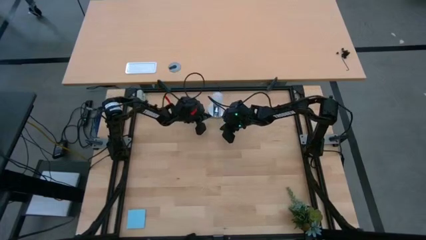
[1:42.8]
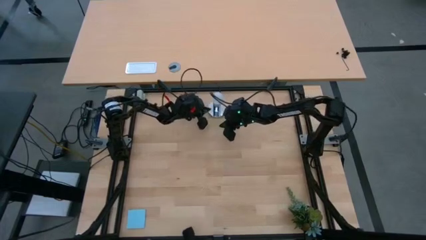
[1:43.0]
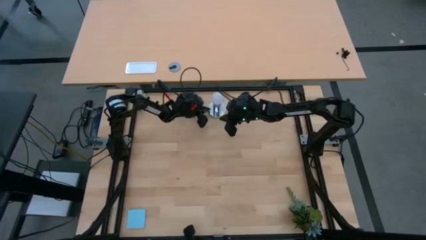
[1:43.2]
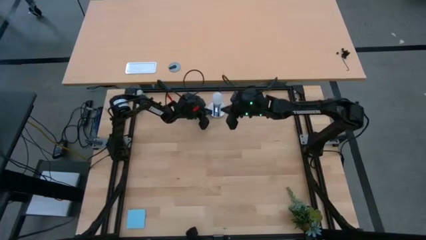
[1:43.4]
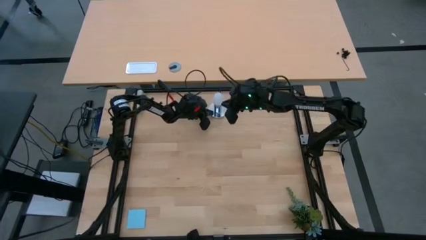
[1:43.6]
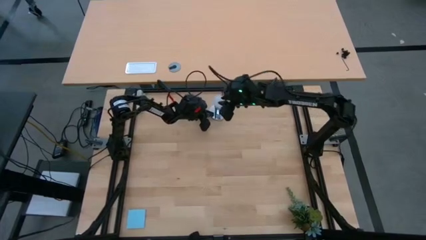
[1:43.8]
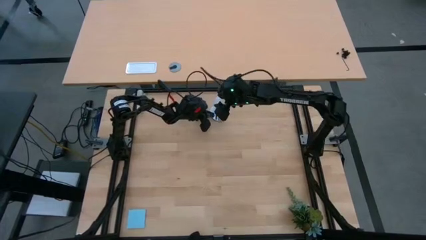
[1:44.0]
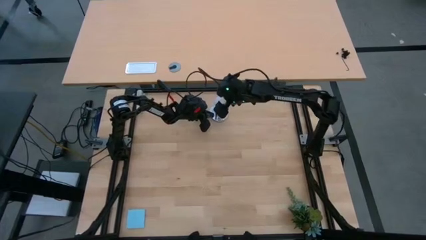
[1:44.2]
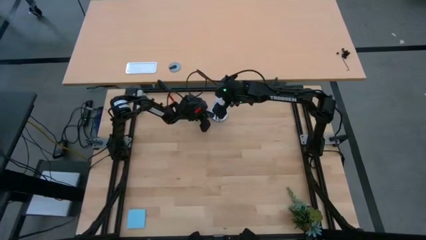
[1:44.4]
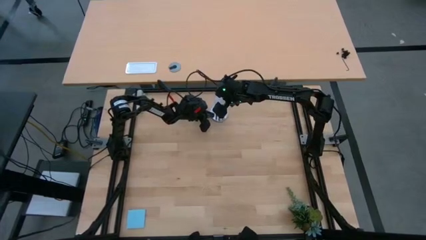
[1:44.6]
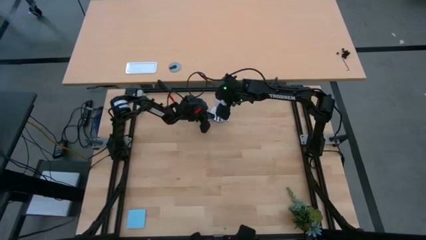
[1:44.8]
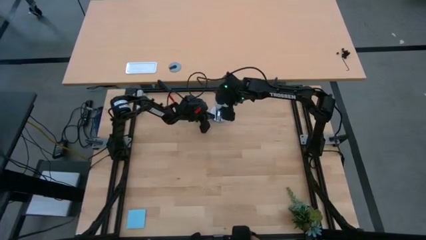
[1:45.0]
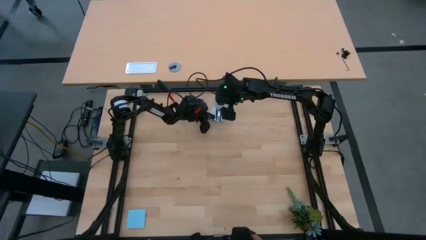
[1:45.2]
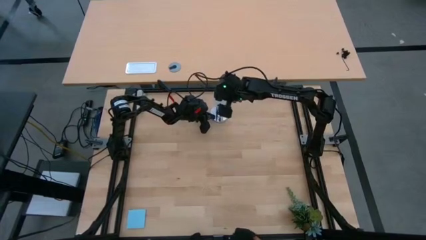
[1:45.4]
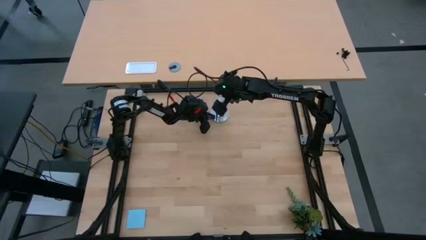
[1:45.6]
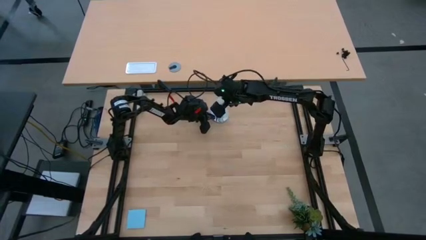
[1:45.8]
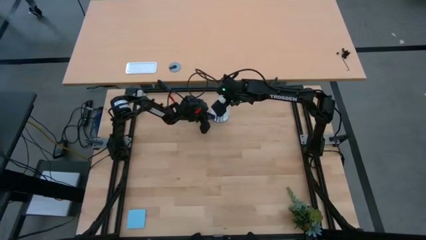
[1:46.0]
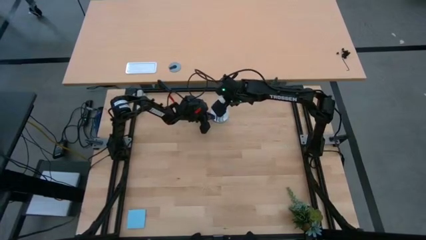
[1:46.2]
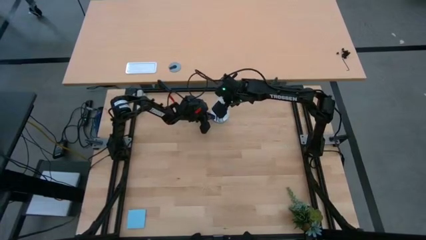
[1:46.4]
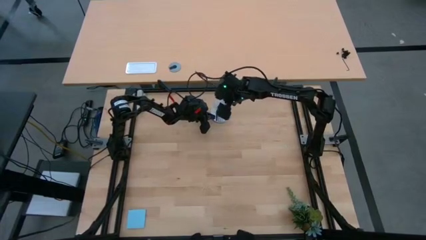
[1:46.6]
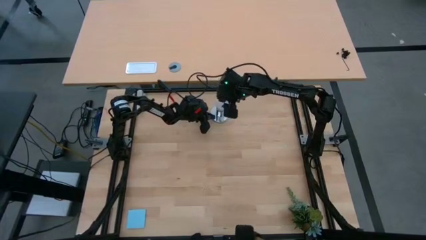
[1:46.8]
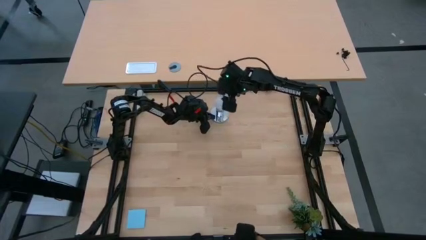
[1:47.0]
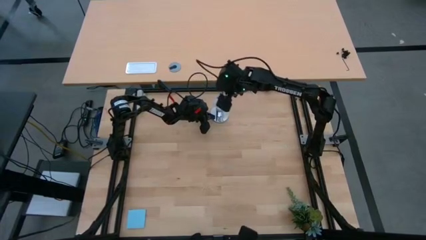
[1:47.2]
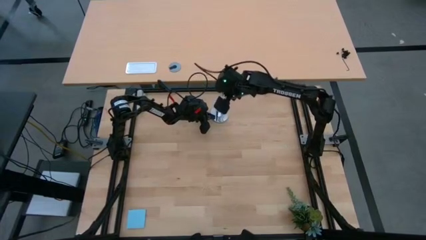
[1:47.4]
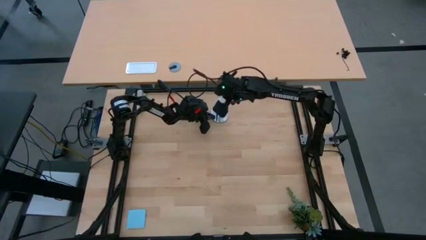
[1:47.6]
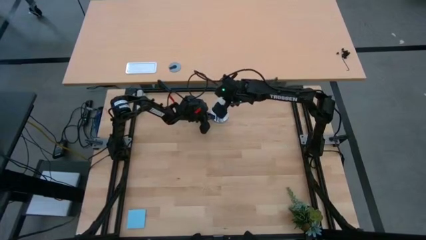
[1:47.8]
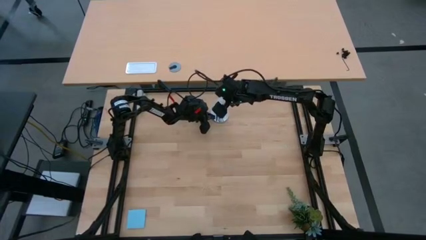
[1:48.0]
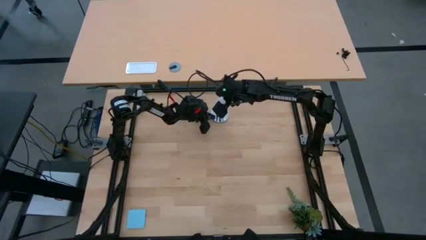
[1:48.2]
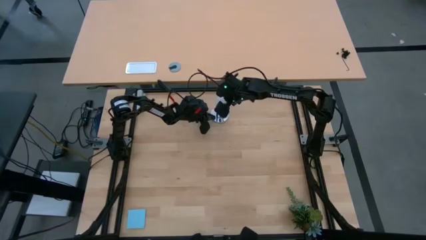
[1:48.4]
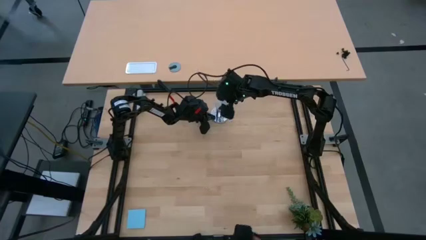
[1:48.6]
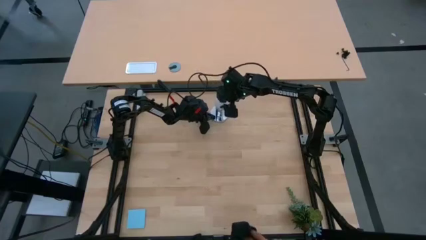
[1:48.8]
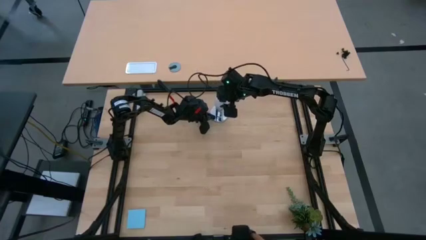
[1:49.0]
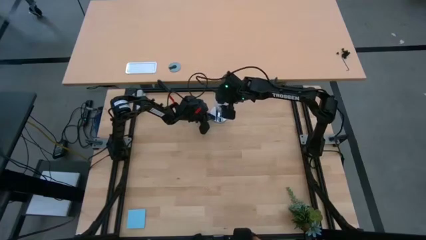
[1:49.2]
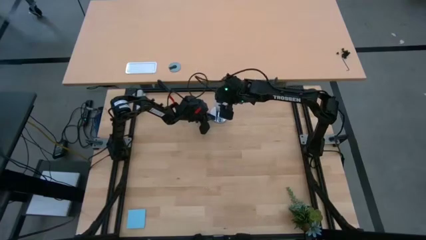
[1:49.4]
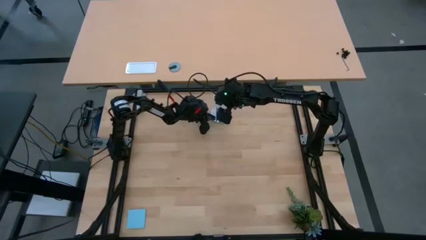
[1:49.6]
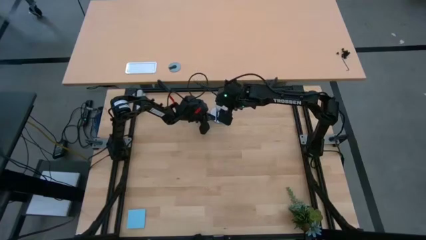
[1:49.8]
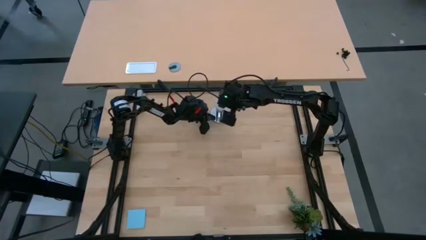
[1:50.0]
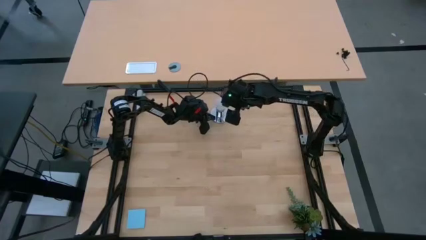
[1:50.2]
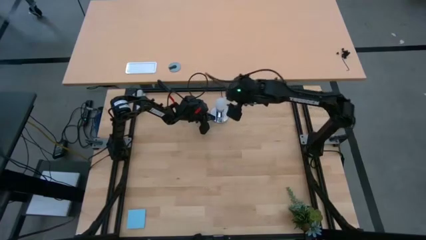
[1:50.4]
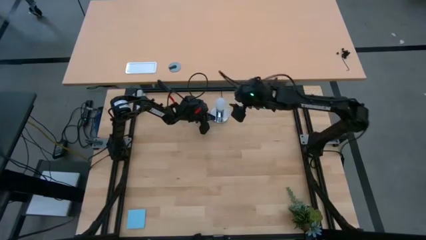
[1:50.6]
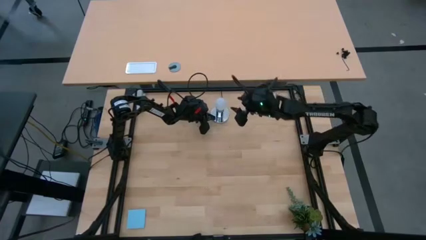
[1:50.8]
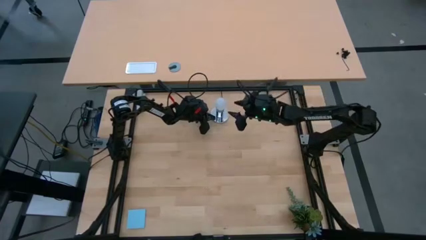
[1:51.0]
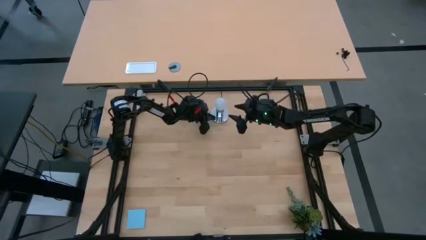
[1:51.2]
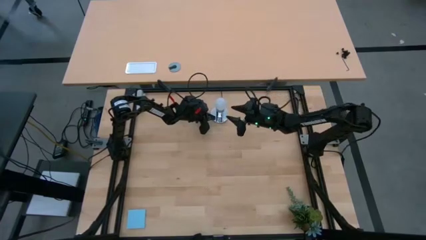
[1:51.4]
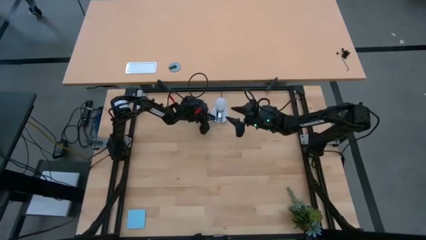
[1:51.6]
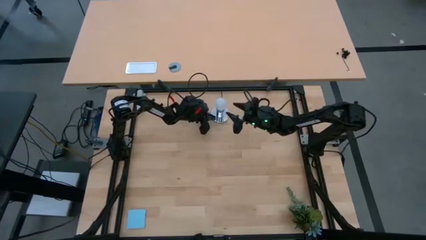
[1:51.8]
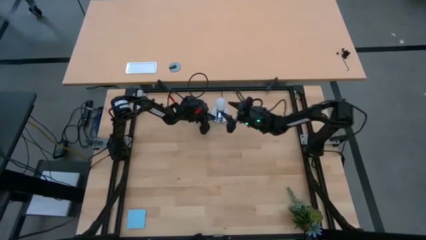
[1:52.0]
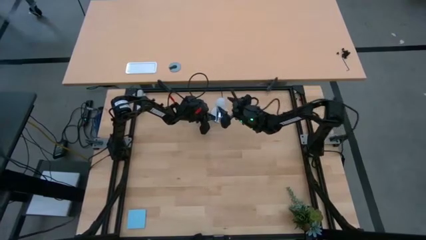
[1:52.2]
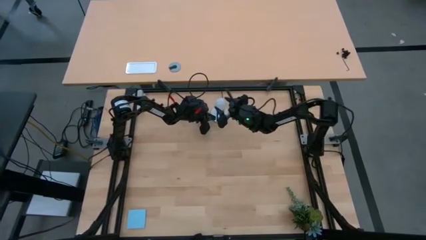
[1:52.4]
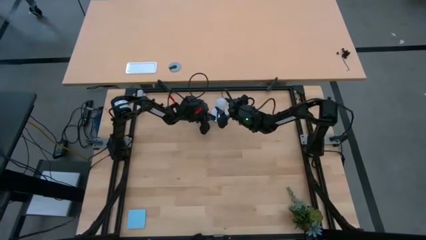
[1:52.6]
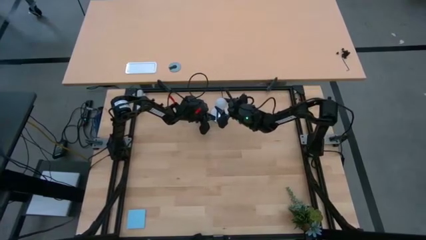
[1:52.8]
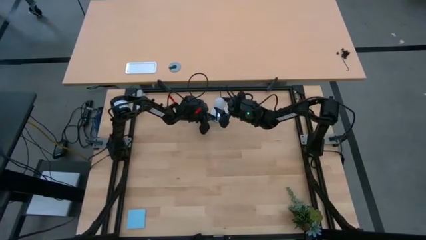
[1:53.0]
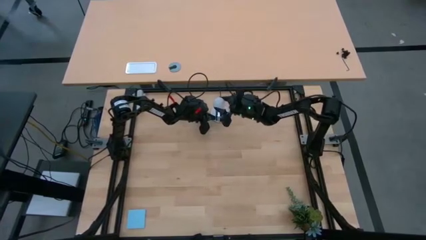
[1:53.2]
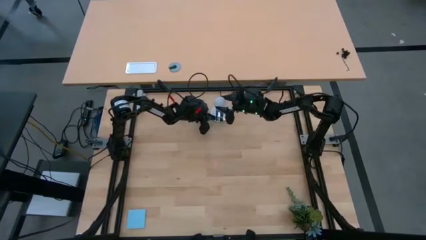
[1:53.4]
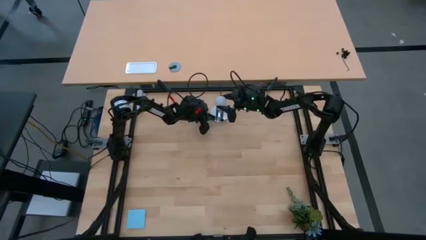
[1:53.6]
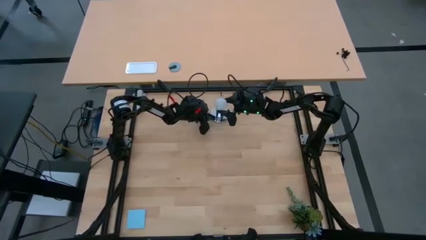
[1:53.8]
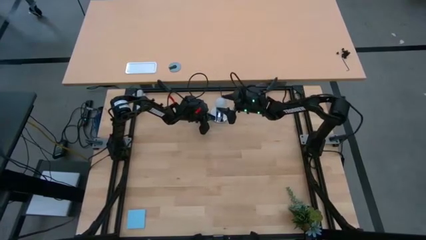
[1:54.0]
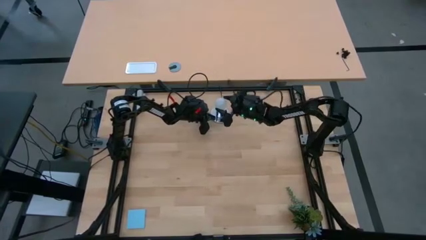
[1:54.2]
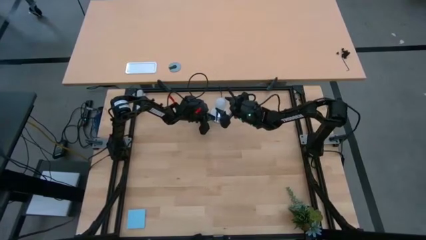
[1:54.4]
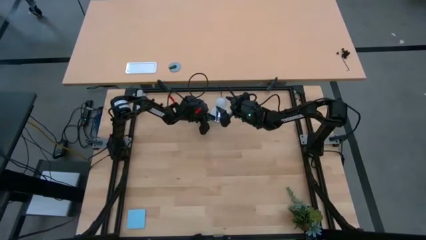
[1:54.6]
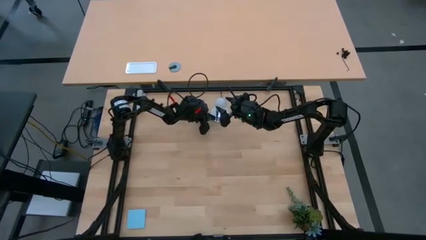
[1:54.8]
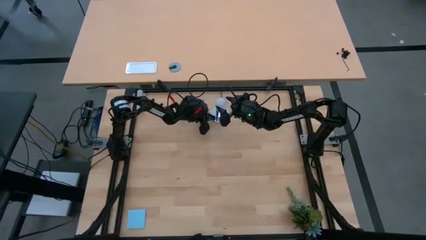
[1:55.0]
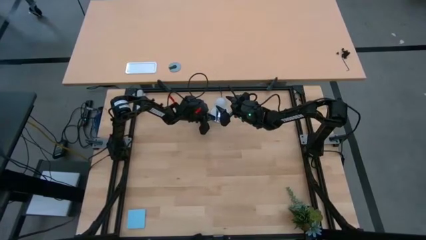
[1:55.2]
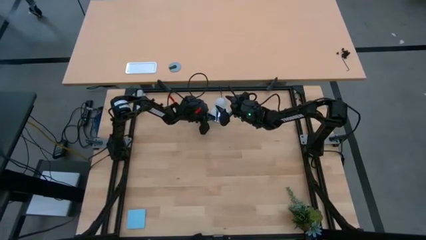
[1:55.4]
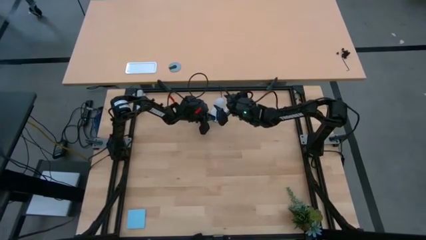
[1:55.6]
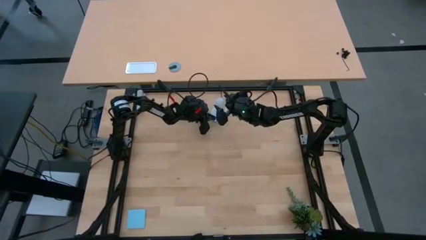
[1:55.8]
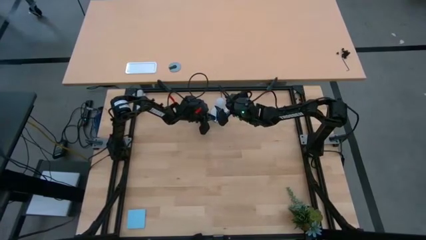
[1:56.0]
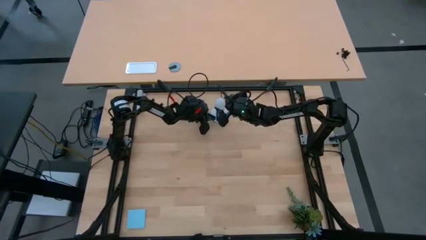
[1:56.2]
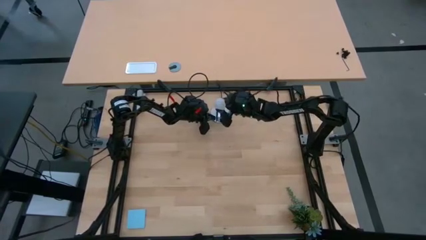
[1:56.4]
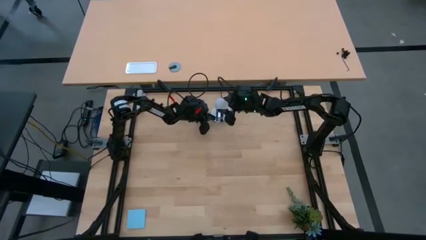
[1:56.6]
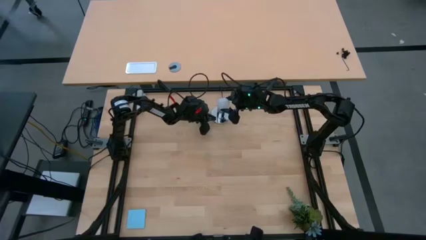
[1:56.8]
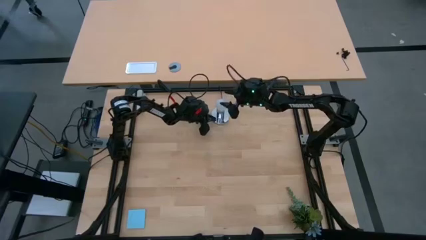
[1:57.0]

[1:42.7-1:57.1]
Task: Screw lightbulb
Remove the white lightbulb from the silver lamp

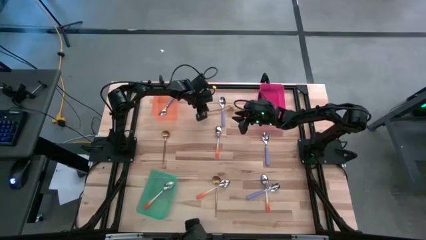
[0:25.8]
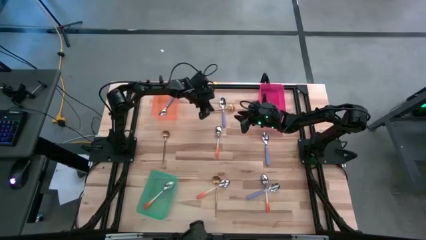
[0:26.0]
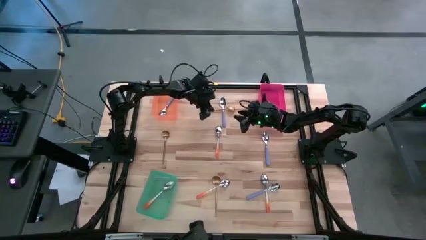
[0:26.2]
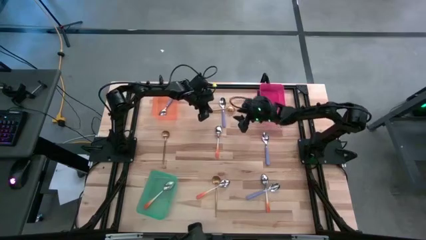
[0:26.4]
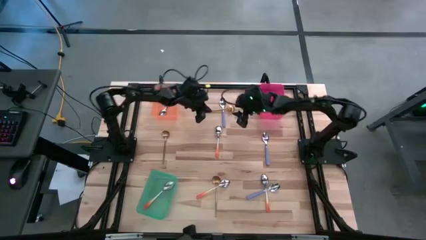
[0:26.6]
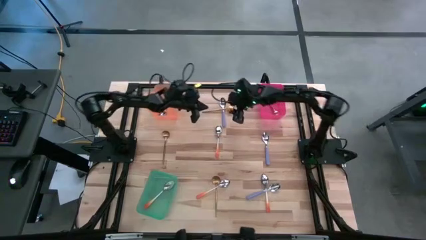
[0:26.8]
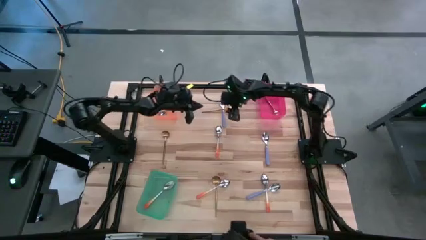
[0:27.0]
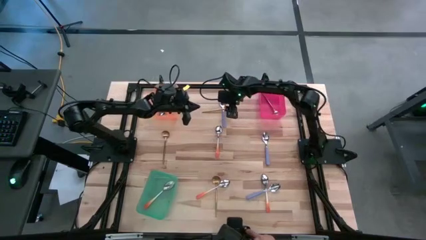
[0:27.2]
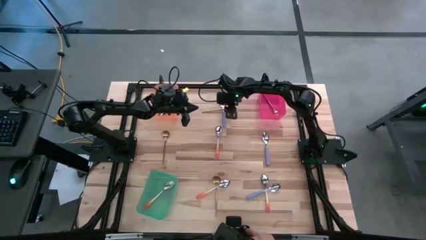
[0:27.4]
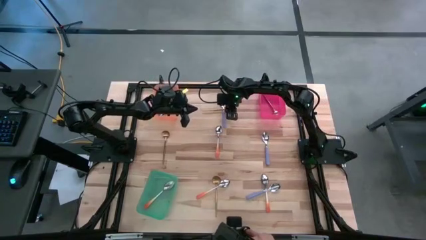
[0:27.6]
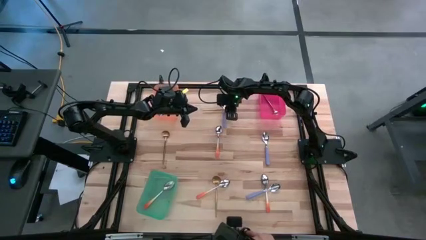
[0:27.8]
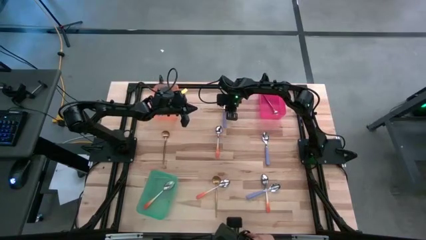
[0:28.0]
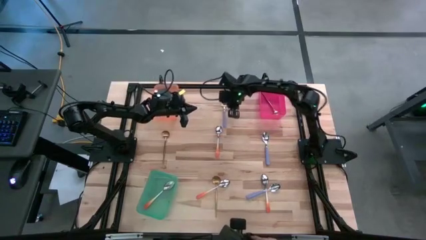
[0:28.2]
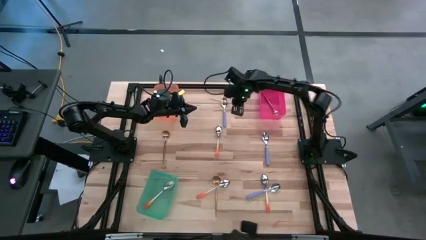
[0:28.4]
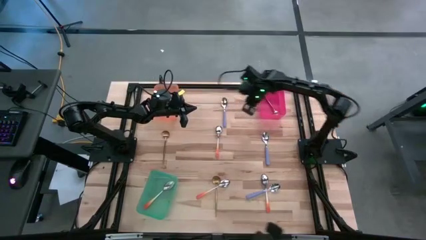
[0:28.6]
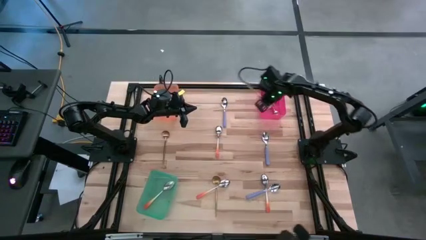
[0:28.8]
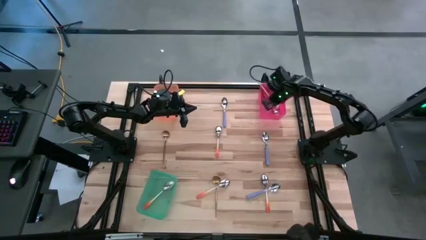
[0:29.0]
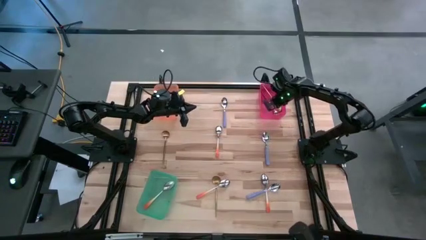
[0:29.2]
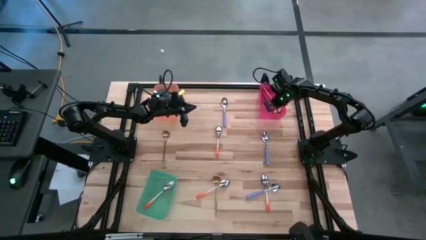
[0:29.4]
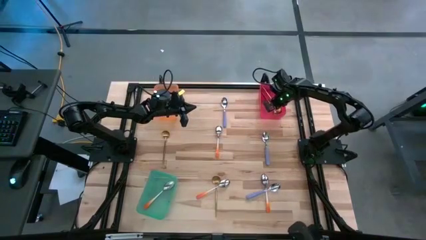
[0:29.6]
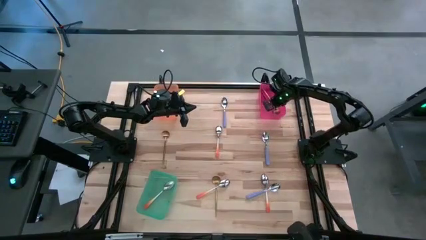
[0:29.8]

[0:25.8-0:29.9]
Task: Sort silverware by color (type)
Put the gold spoon into the pink bin
